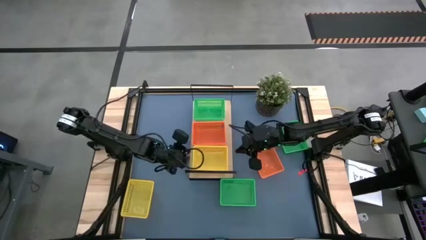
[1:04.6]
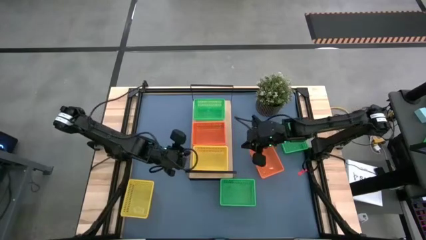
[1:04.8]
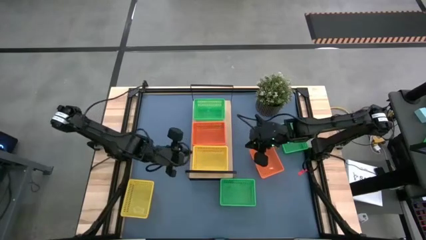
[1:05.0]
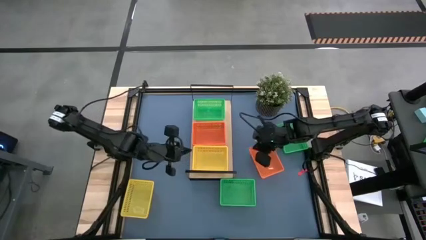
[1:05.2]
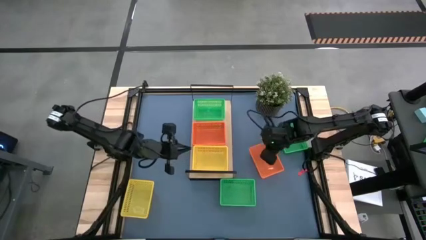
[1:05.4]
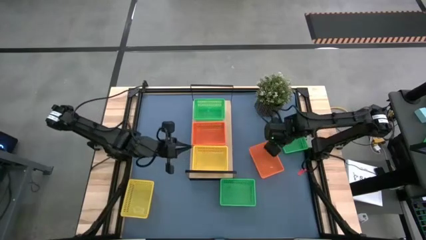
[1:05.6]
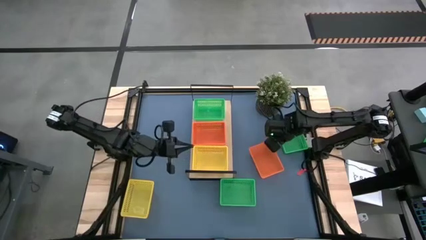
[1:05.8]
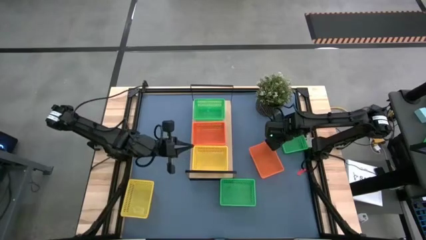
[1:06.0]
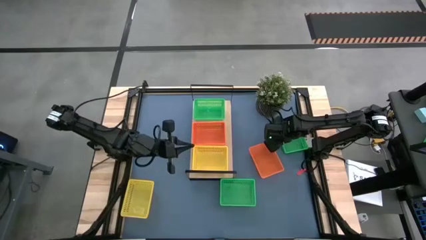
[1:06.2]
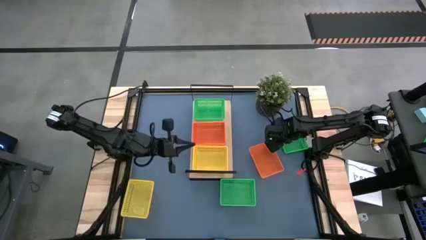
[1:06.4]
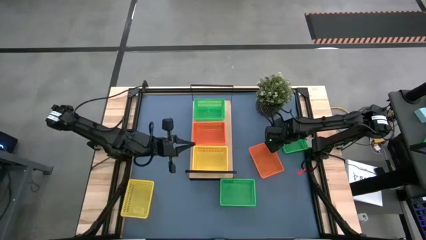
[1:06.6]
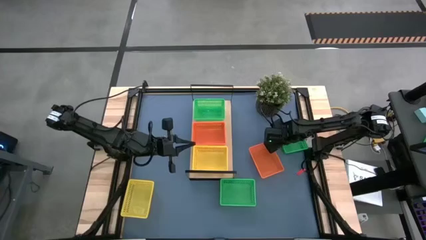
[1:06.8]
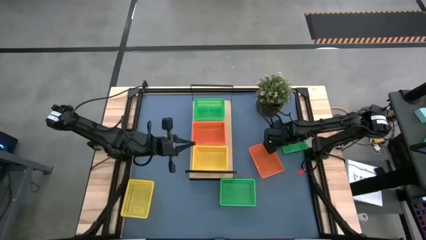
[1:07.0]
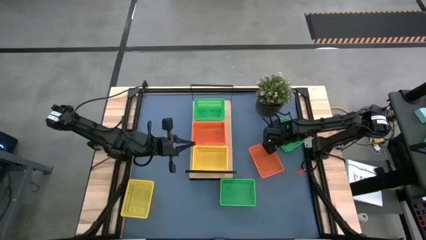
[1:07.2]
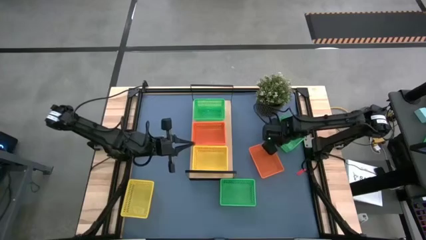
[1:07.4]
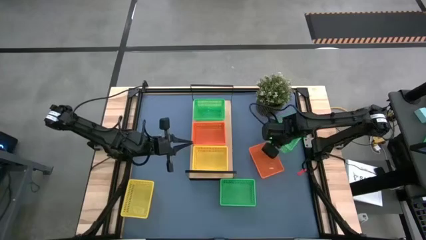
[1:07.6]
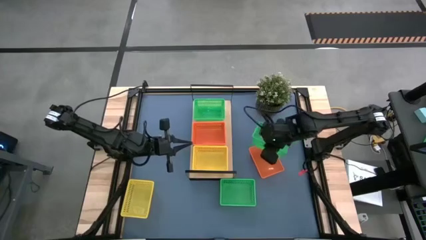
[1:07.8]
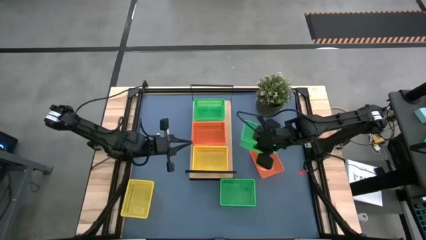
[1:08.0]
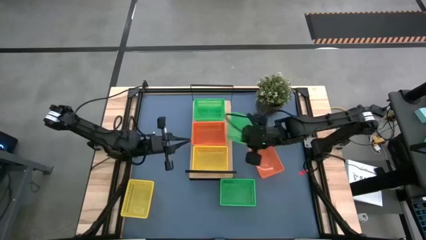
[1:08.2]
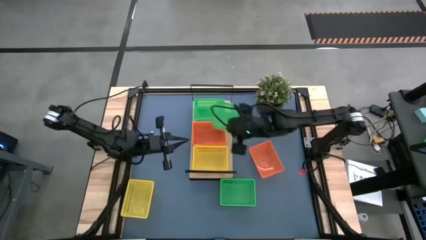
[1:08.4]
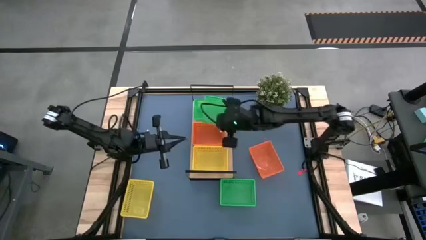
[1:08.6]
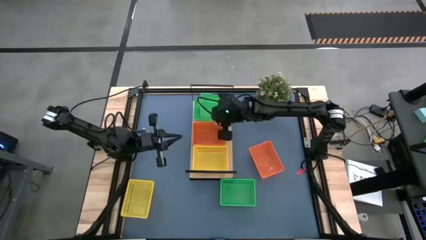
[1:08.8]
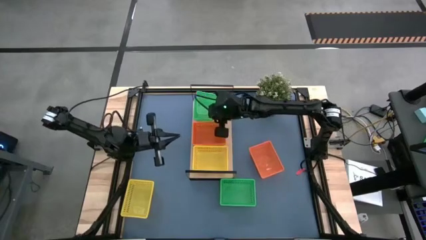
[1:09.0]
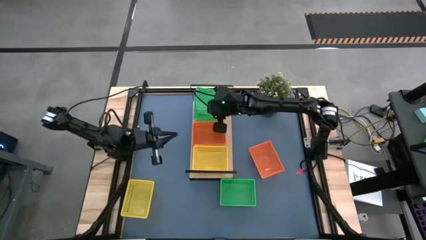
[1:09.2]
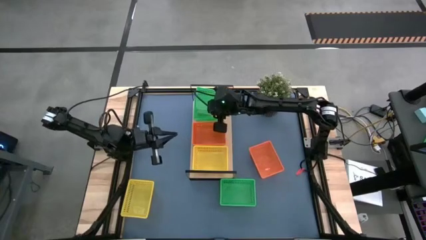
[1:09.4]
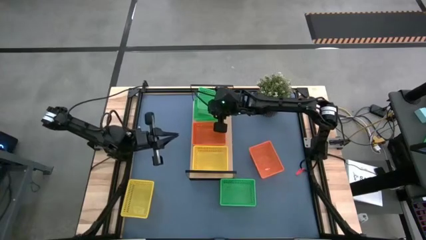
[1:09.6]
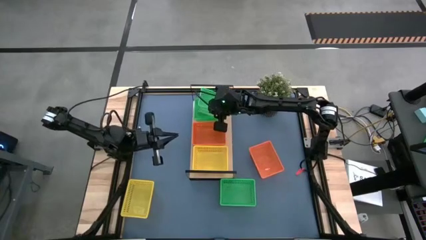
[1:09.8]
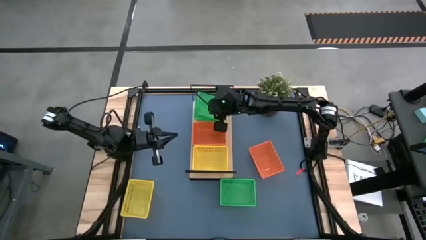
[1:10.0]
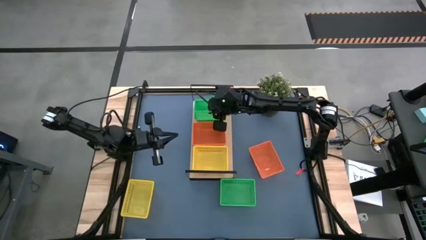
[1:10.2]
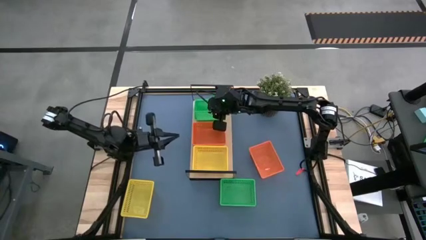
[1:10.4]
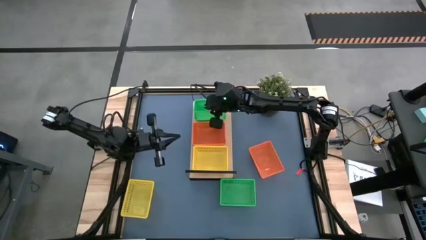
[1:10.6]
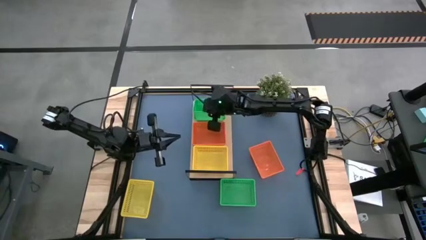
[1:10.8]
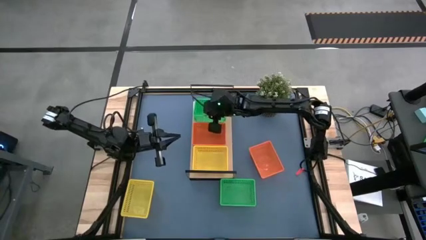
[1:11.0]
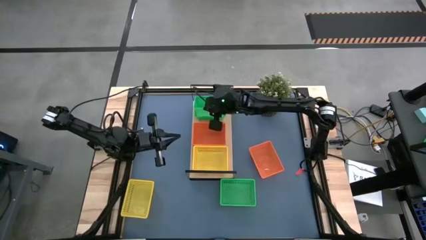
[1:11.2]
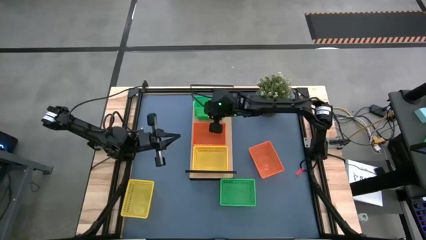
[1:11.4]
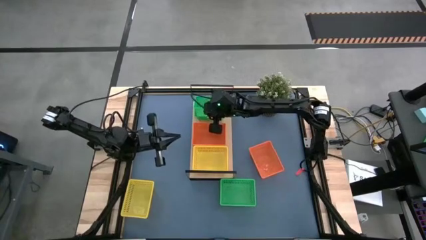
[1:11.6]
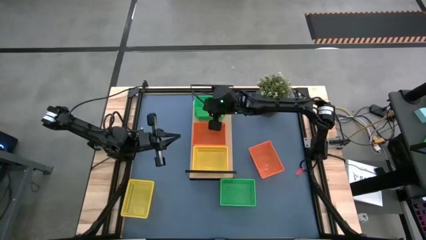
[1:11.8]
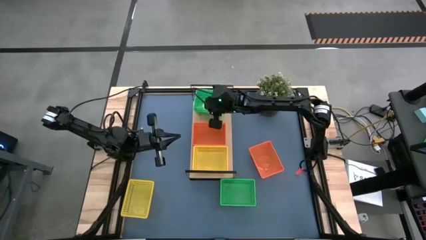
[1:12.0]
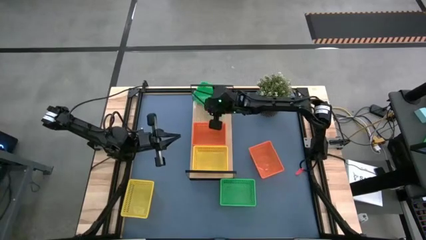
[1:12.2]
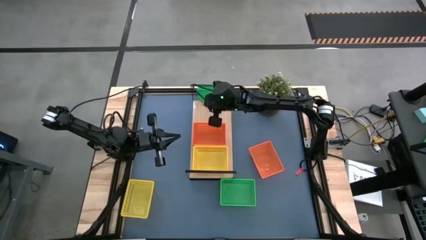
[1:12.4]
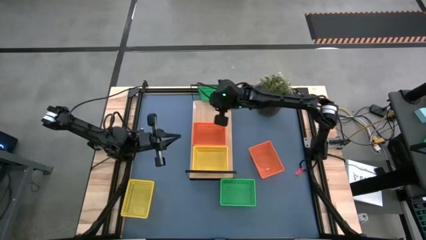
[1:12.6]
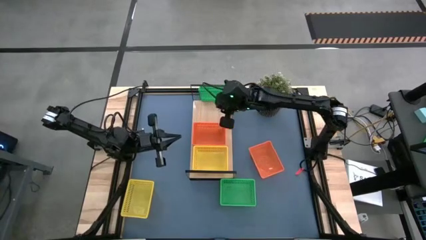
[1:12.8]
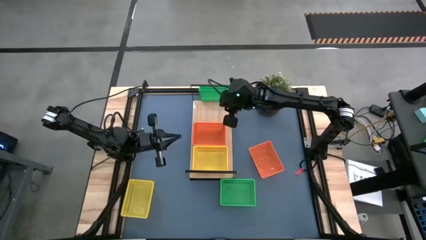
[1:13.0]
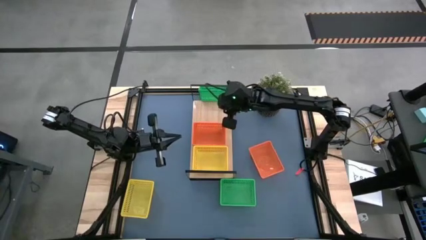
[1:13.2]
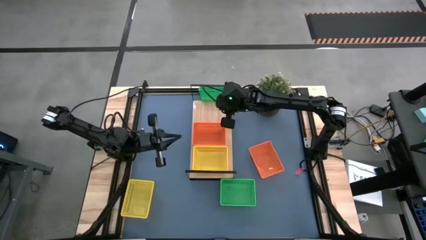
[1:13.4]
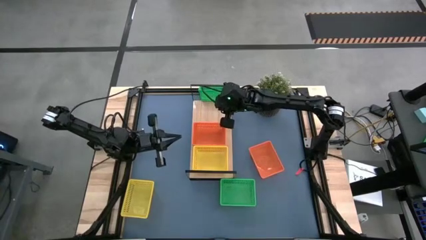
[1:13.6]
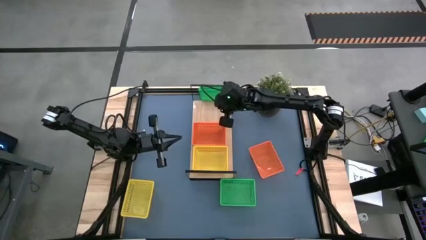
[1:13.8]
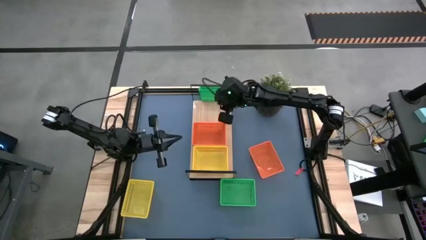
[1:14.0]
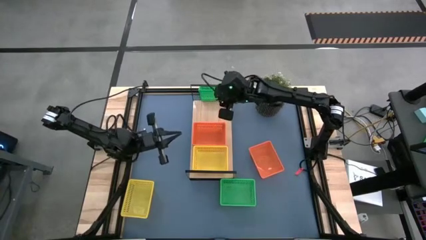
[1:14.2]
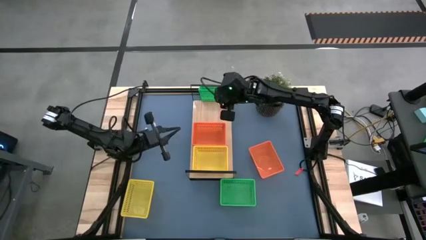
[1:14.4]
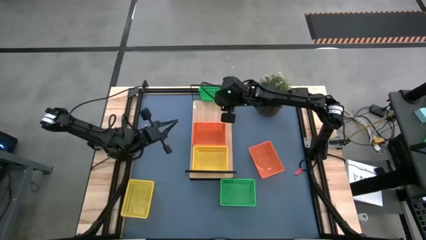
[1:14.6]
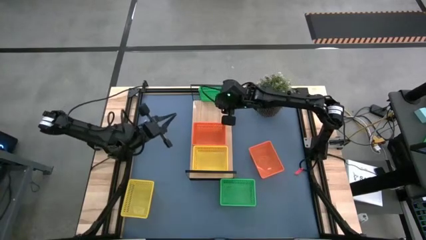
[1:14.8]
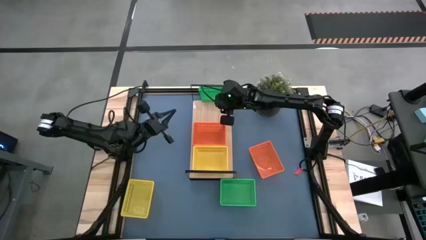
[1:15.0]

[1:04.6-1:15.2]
Task: Stack baskets on shelf by color
Stack the top green bin on top of the green bin on the shelf
